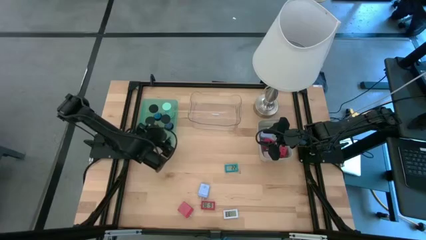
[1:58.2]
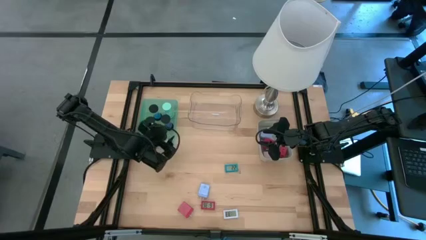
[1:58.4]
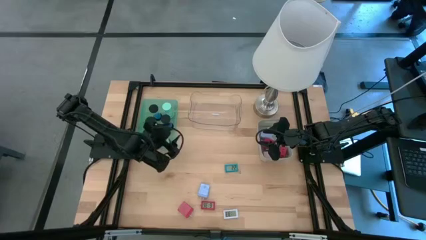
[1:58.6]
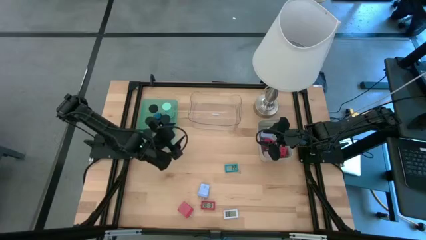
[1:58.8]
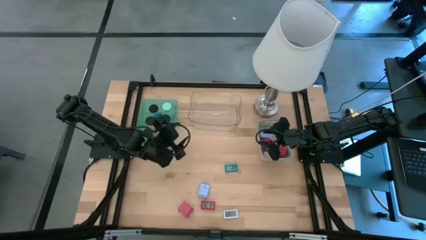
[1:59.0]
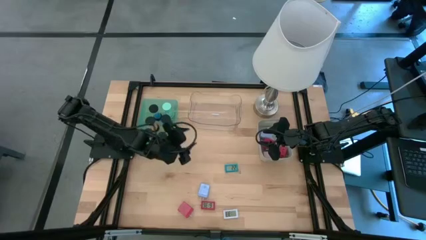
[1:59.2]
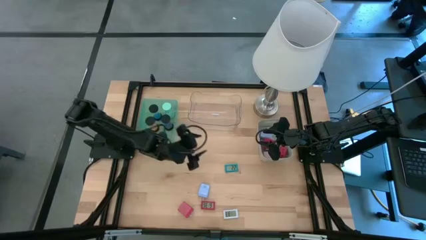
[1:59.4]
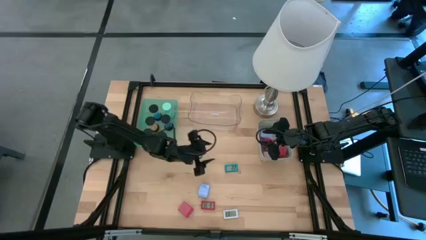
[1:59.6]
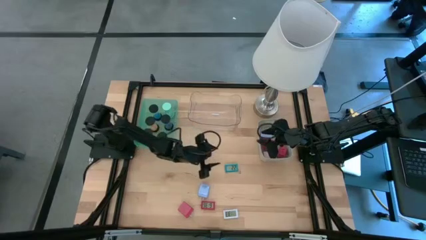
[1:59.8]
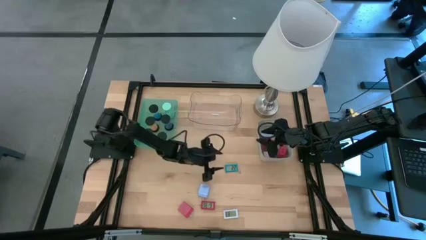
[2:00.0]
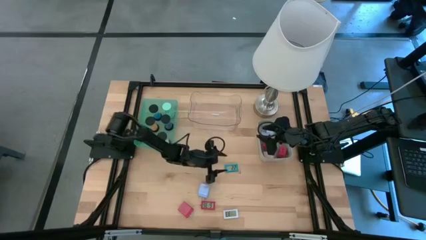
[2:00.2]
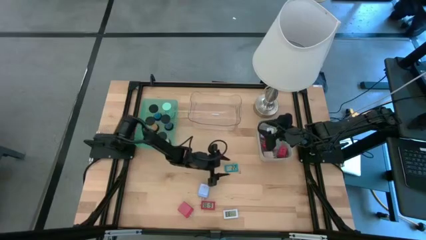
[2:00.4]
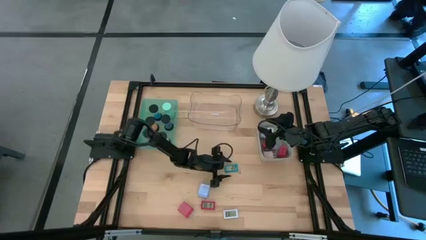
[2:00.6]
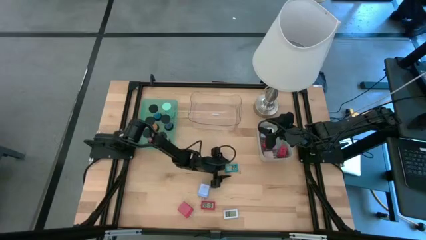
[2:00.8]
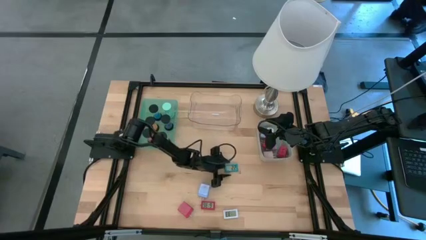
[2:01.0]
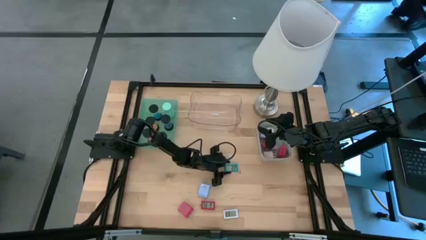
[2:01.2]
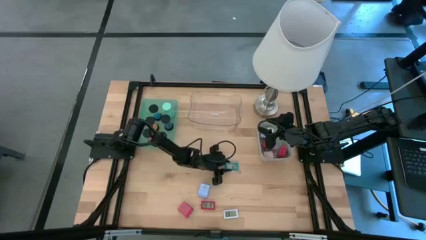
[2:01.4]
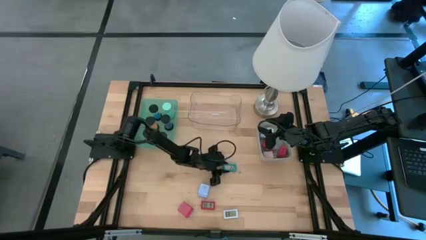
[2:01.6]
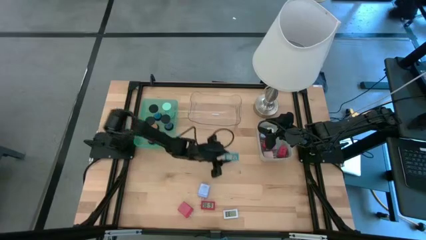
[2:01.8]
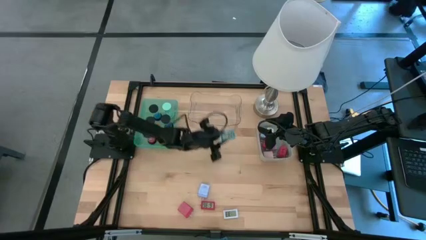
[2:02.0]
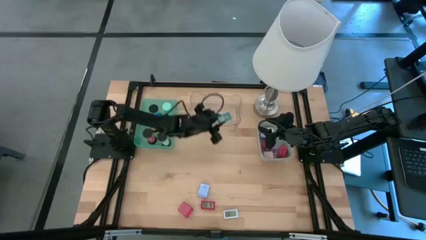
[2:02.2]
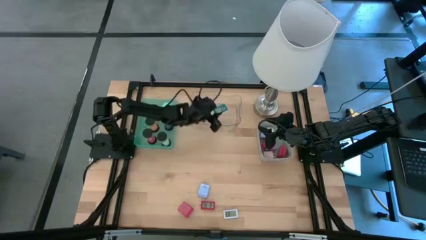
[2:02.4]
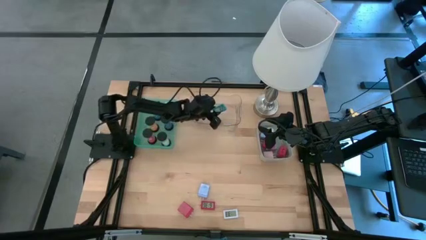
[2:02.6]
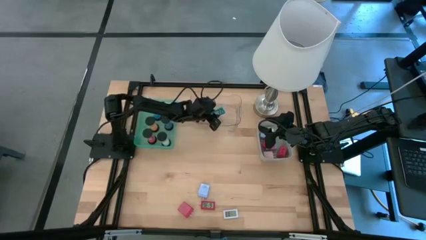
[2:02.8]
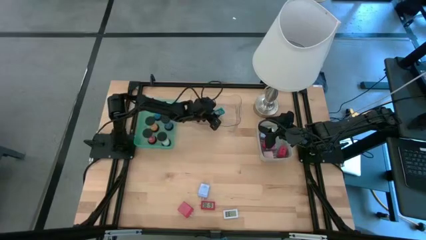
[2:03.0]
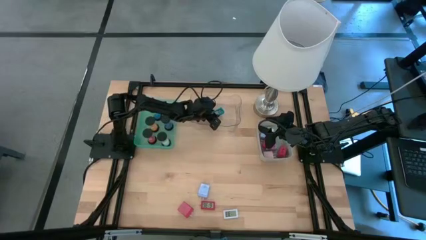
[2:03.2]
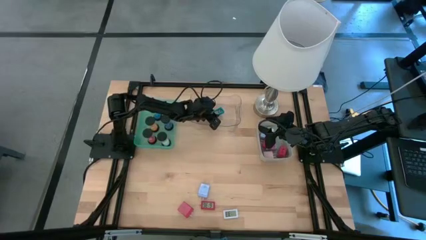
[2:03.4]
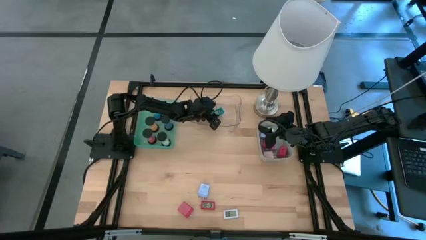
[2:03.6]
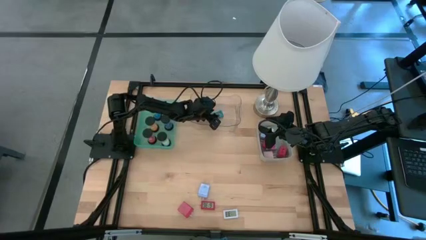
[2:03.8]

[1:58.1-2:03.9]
Task: Pick & Place Office items
Put the blue digital timer into the transparent bin

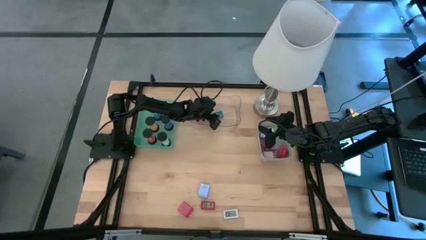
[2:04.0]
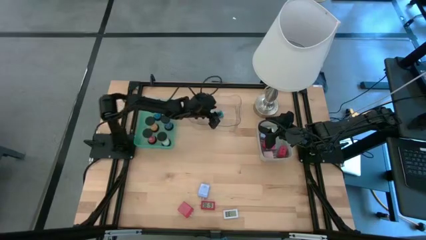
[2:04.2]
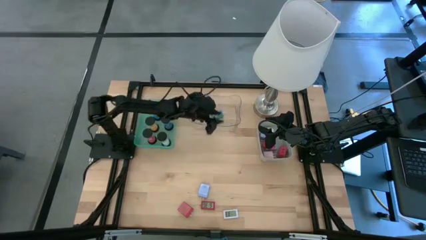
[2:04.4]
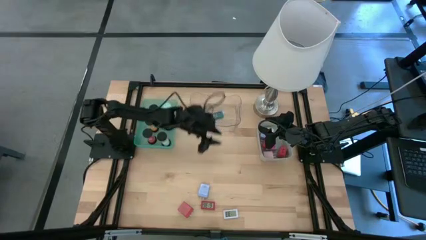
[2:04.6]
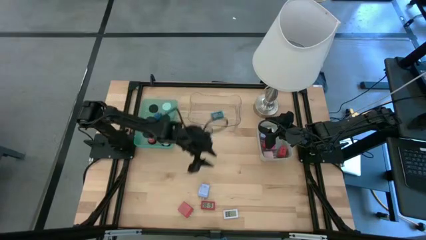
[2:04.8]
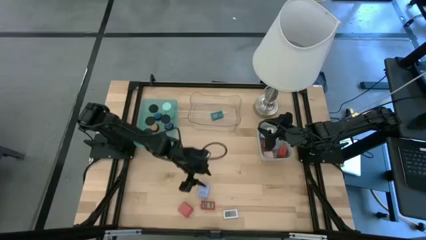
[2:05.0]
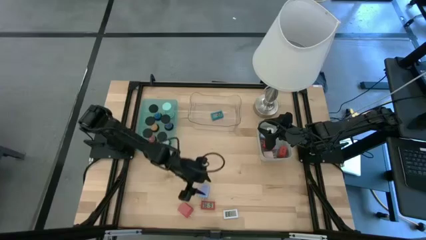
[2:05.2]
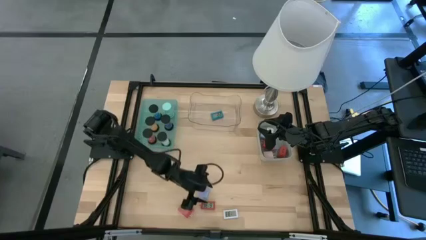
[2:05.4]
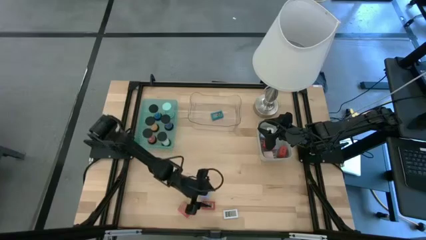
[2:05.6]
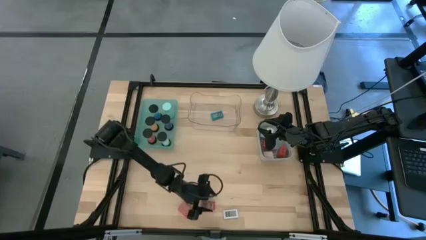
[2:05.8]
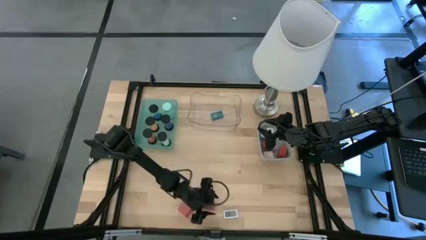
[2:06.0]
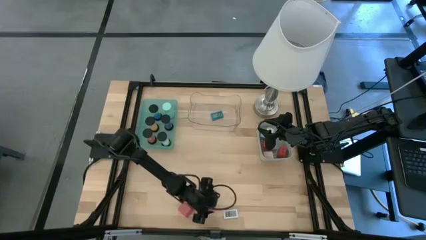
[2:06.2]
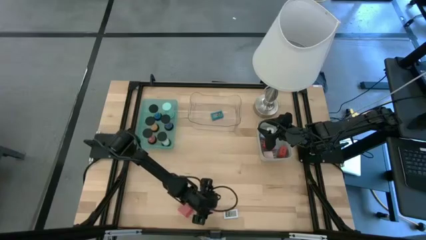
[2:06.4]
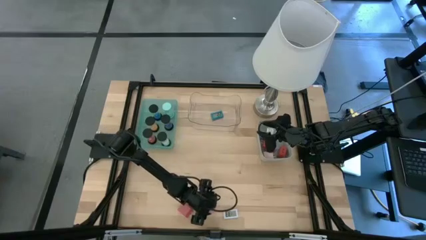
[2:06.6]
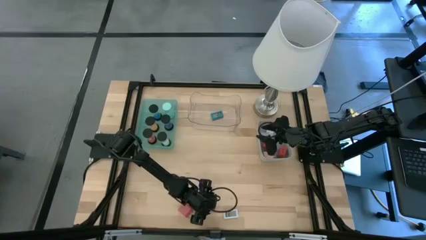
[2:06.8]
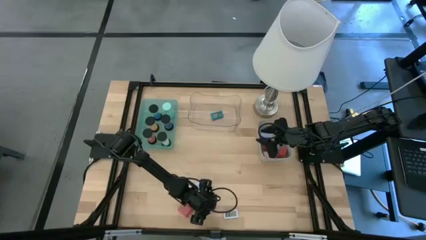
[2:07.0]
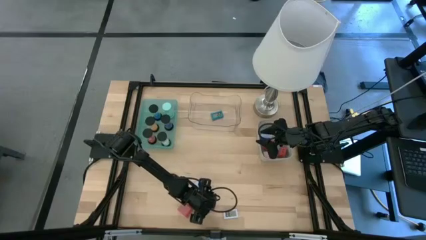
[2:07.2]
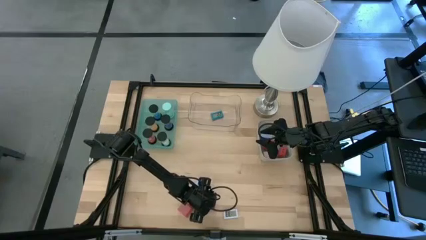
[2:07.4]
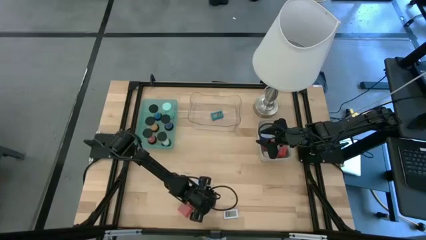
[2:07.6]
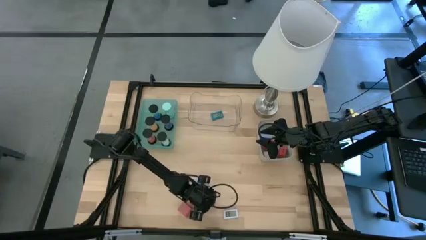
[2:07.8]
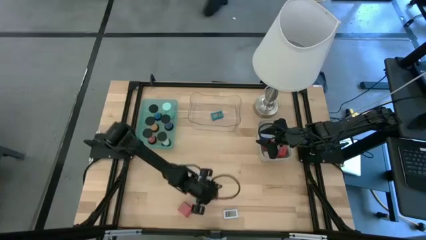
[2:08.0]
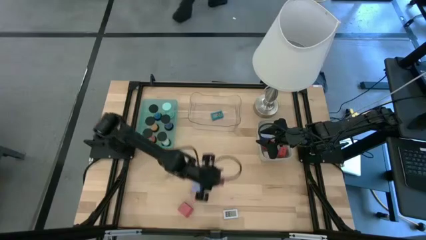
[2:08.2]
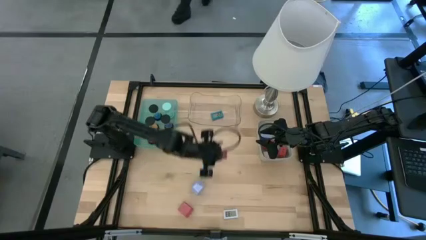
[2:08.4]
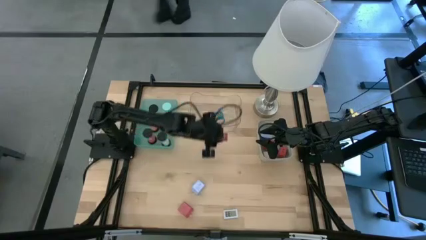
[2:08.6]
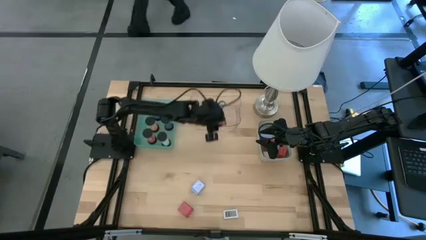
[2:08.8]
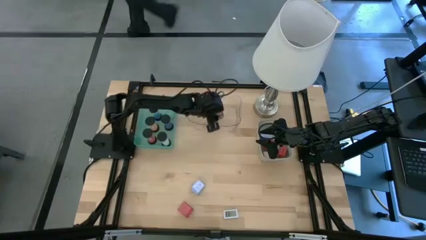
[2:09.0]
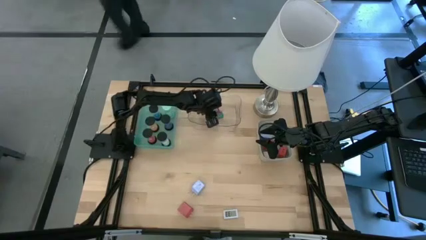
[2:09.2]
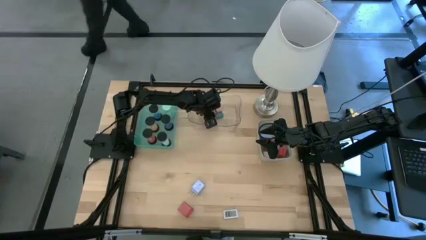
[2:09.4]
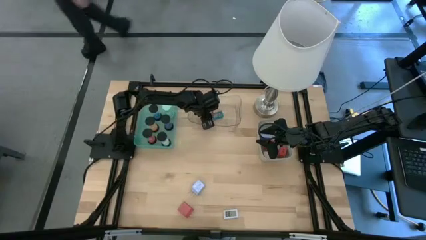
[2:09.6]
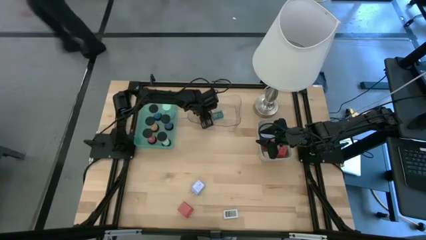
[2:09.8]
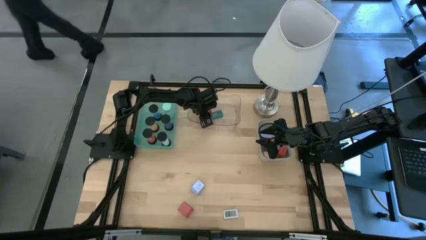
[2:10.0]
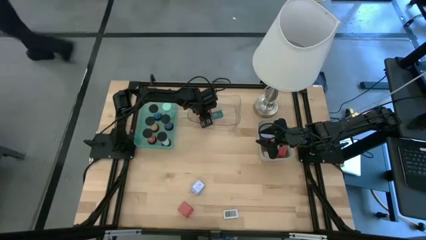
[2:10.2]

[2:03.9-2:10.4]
Put the red digital timer into the transparent bin

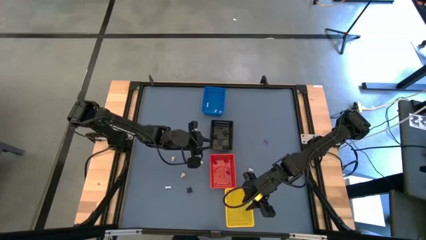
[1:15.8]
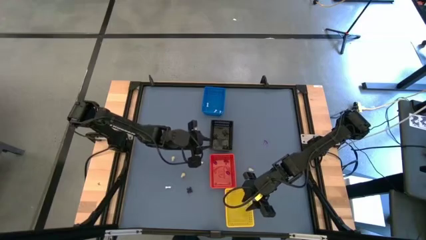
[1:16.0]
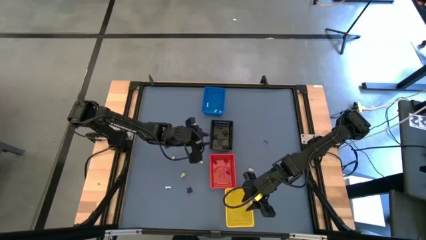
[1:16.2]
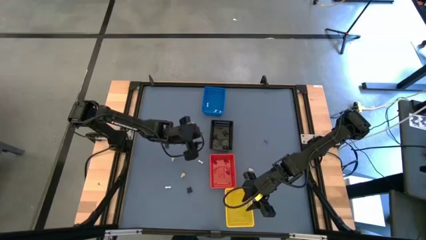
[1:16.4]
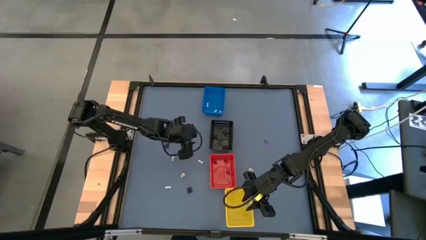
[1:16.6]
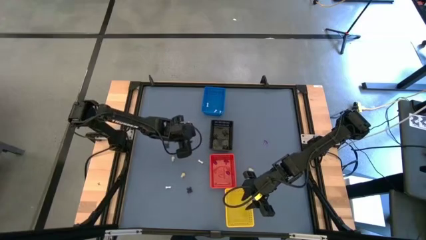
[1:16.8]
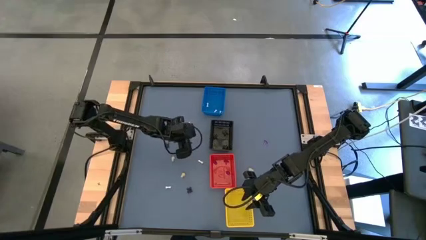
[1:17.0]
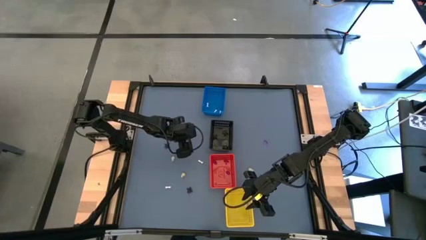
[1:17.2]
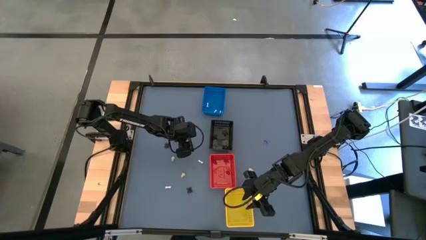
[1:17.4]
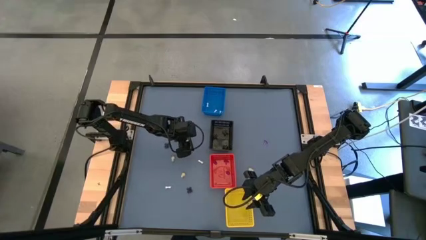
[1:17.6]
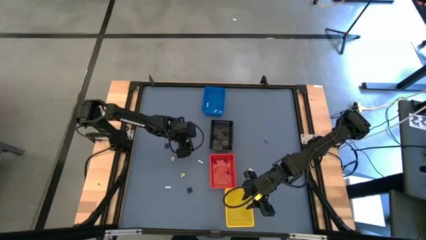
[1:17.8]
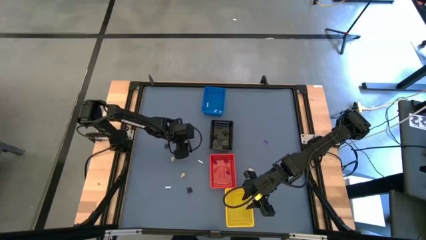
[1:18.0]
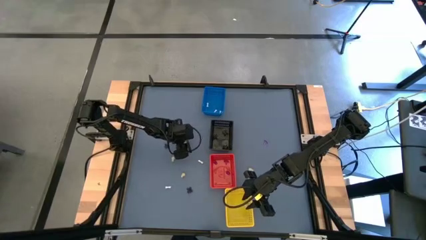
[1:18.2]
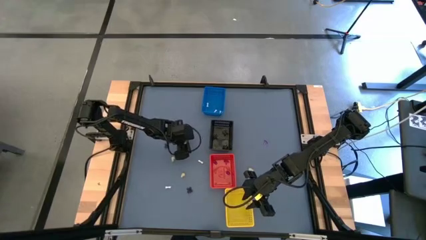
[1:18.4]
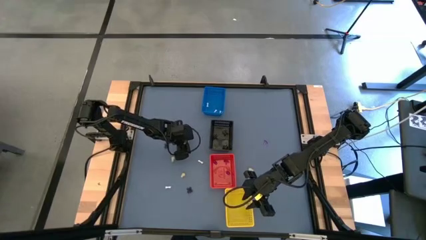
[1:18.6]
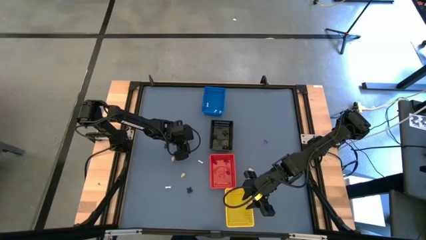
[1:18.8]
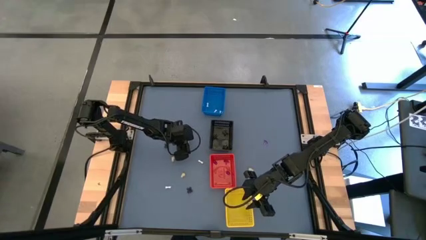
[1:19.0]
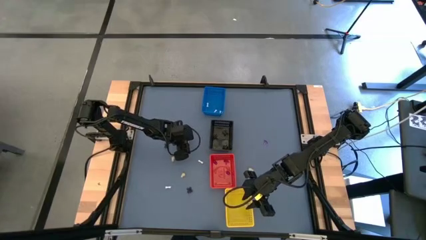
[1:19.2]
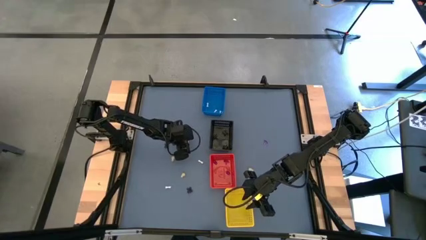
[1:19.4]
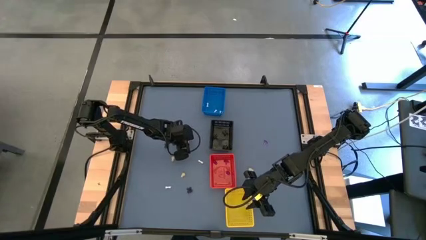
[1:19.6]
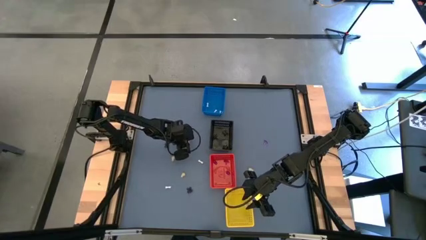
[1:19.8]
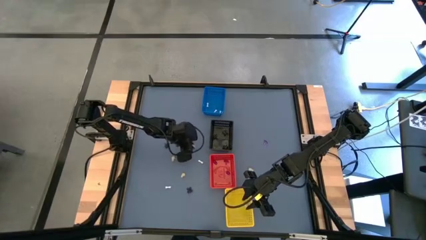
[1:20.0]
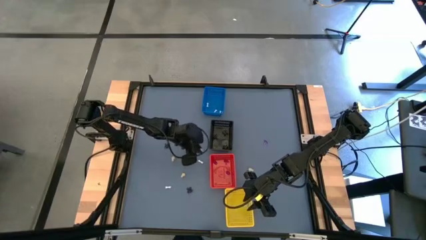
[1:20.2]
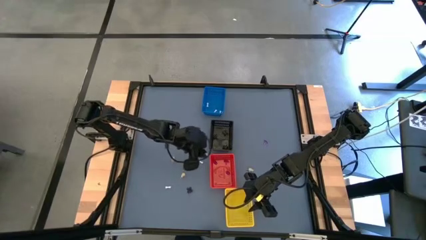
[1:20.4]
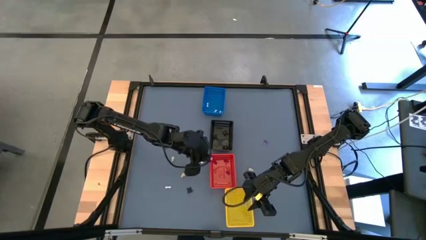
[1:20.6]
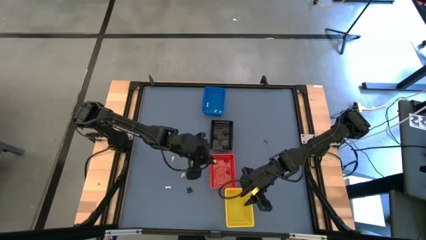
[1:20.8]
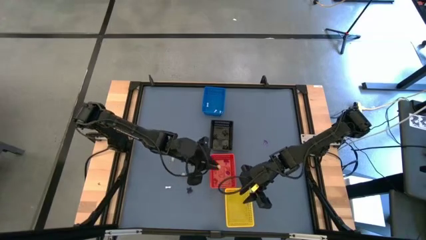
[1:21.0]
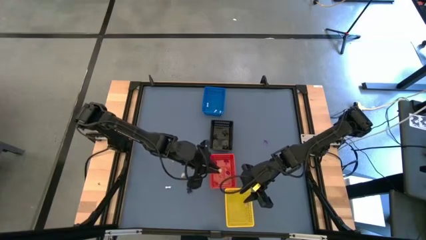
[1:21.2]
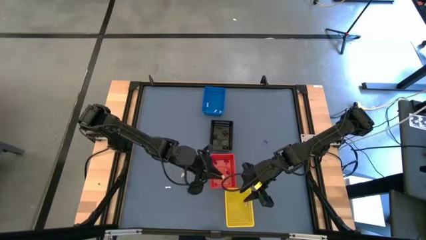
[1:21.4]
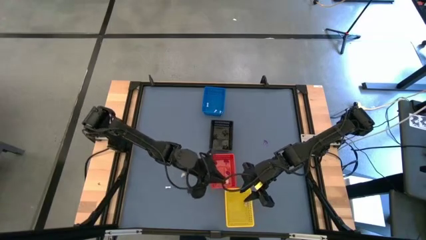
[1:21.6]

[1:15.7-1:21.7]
Task: Sort Halloween decoration
Put the brown skull toy into the yellow bin
